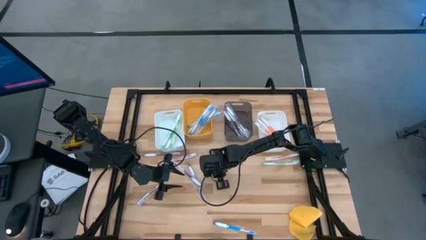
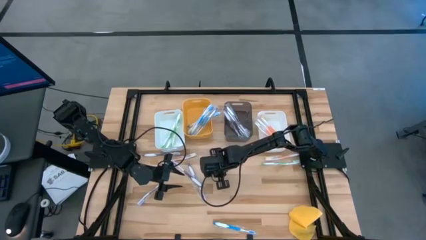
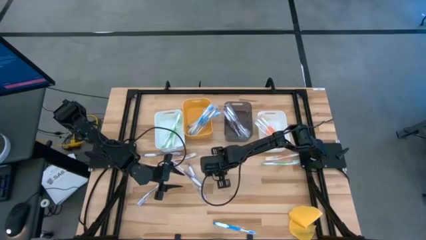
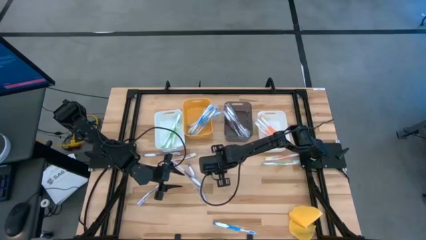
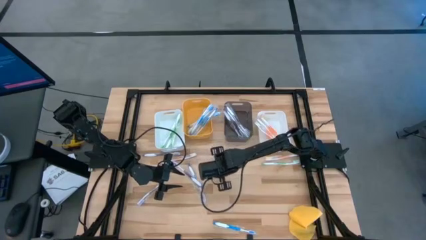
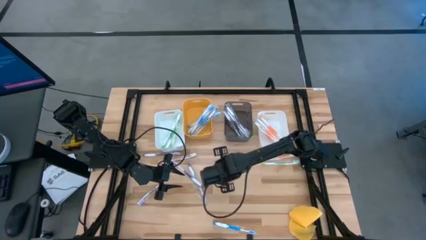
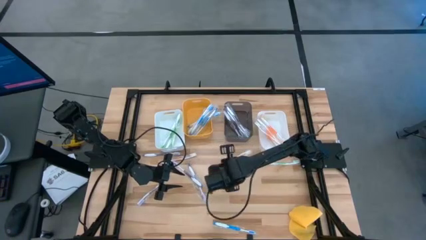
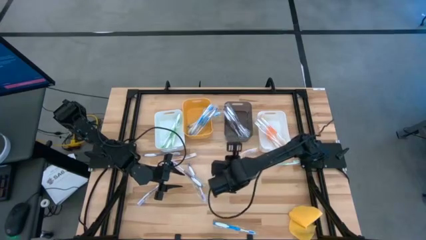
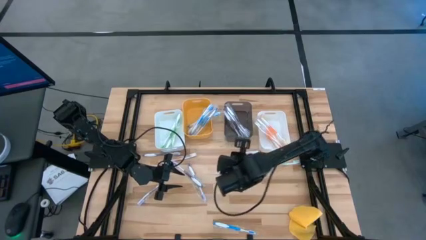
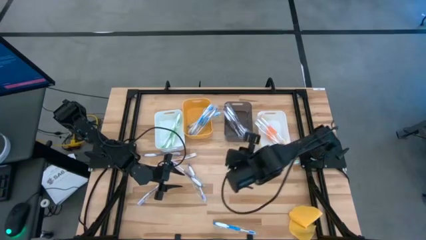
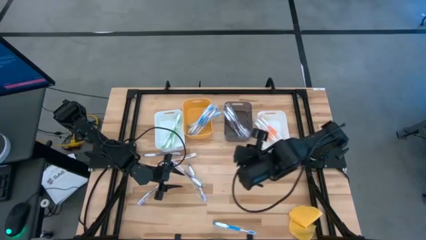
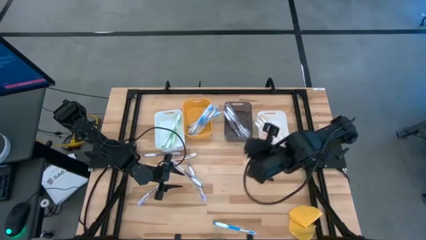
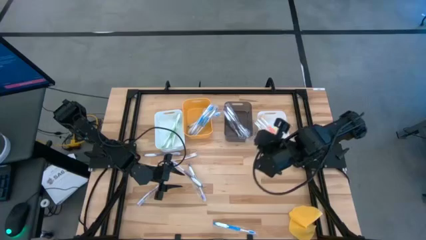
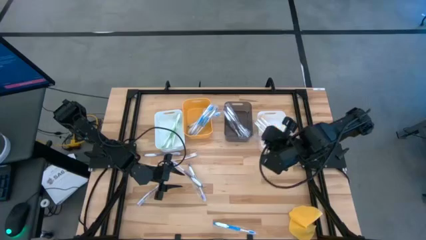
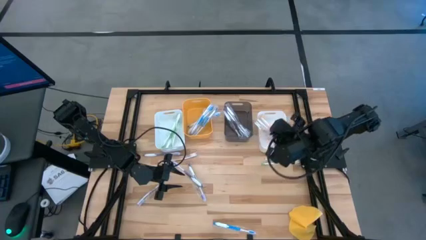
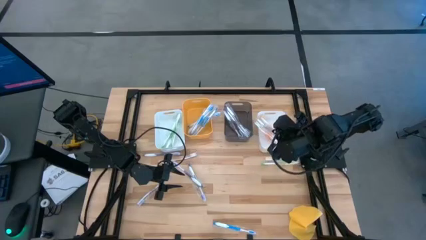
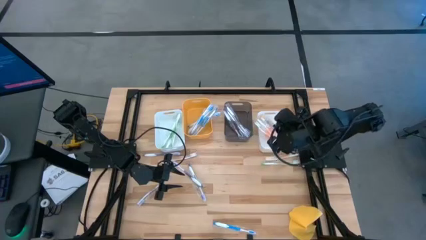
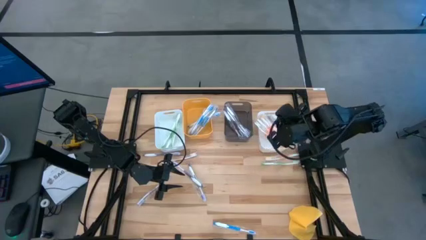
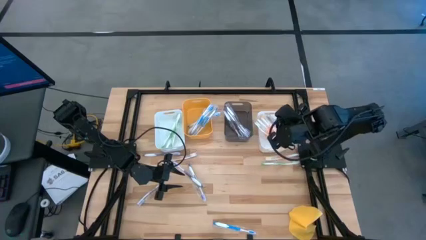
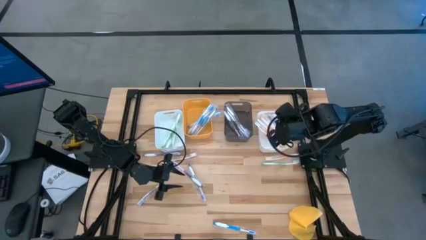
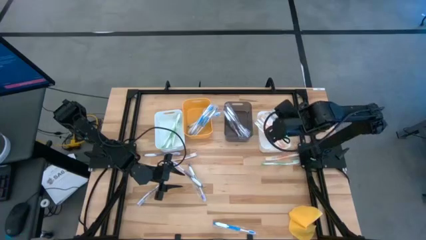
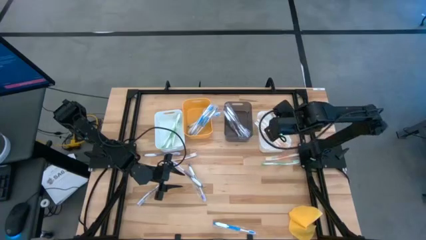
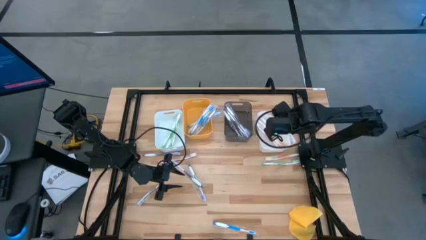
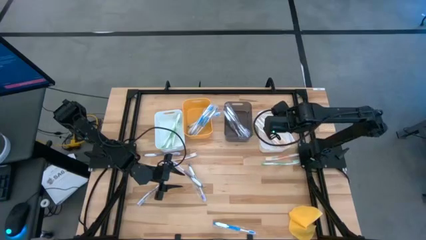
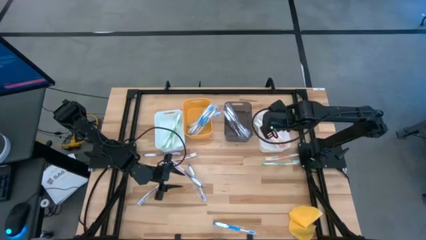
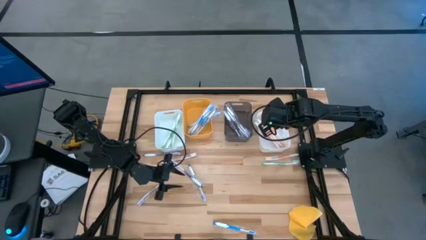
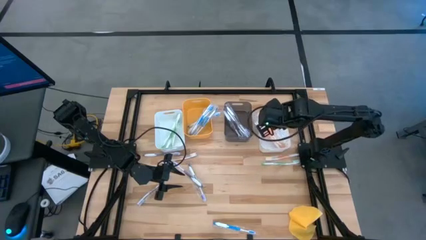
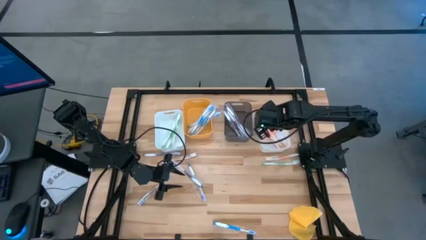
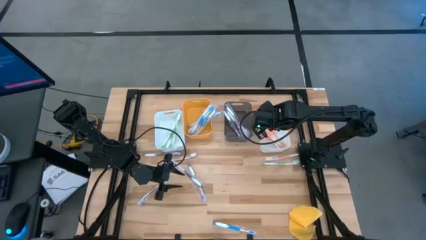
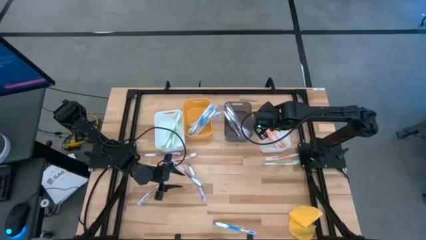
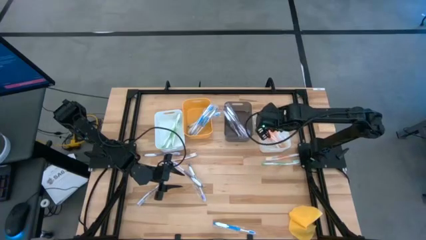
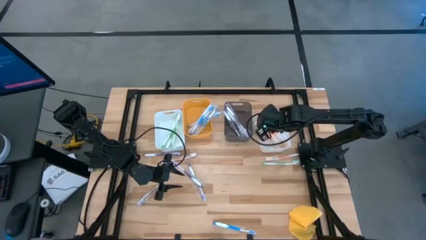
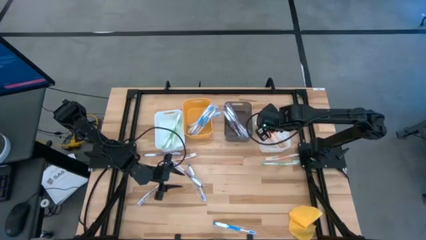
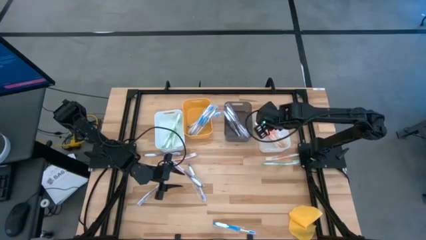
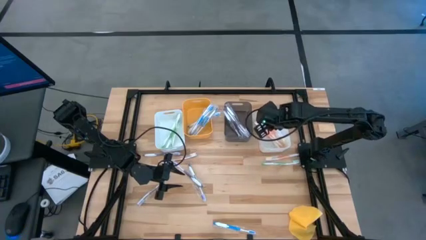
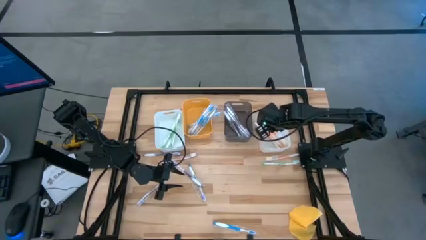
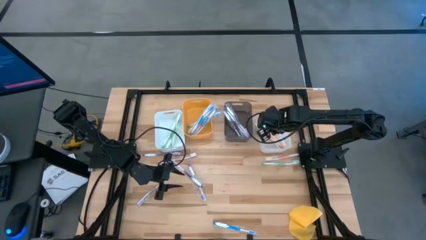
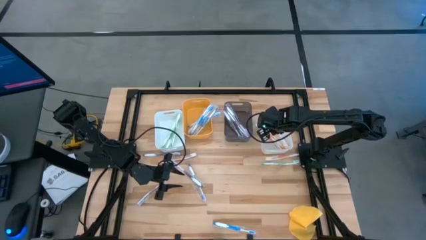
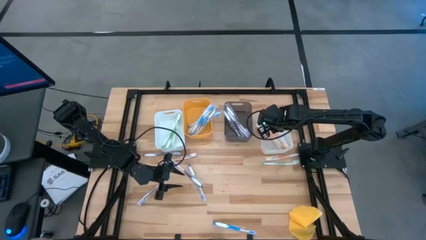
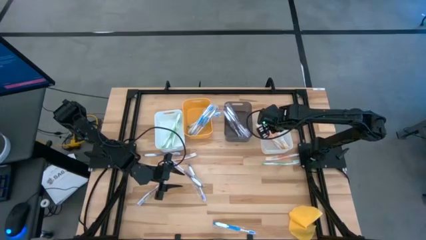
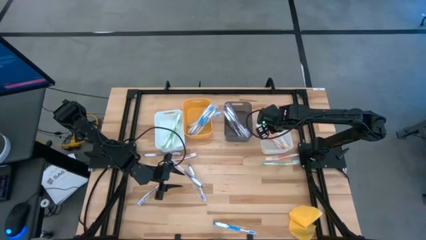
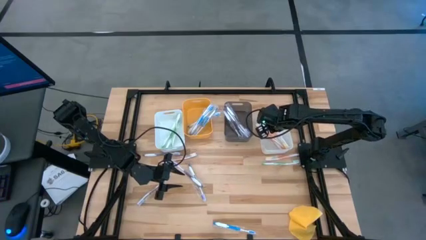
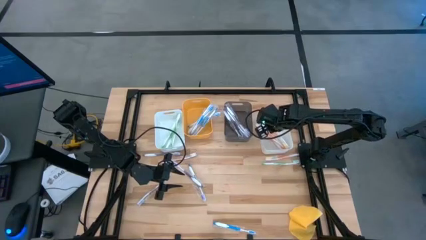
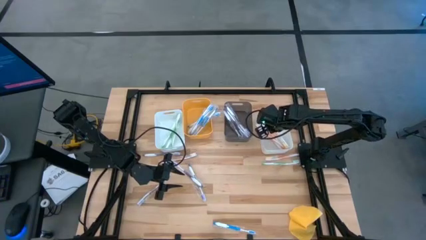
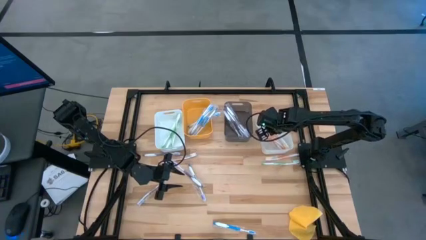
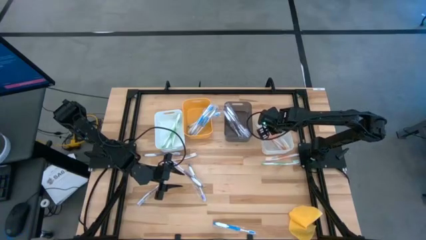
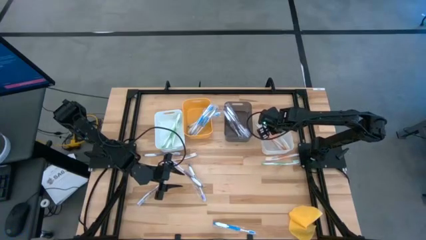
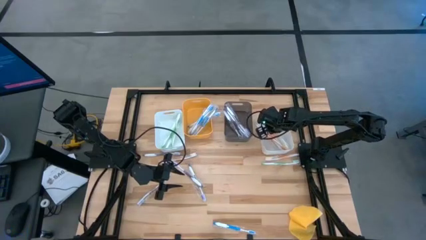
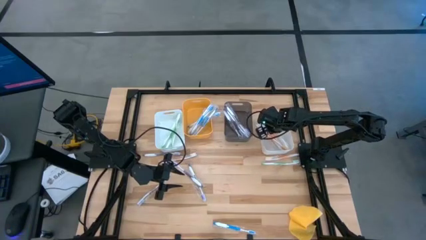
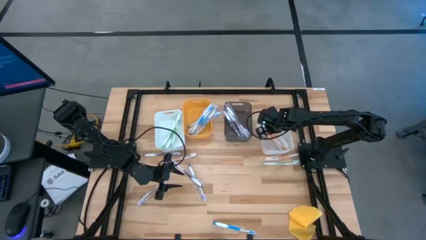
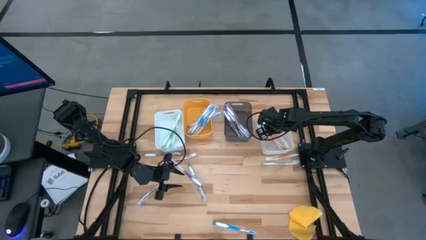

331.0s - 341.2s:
Task: Pick & Place Toothbrushes
Put the middle orange toothbrush into the right white bin

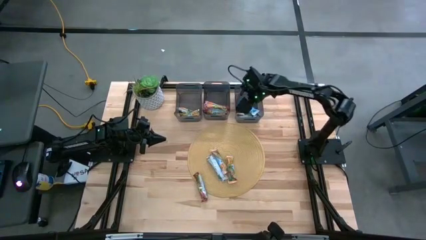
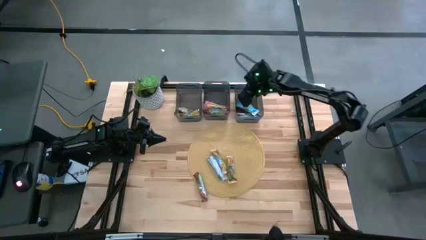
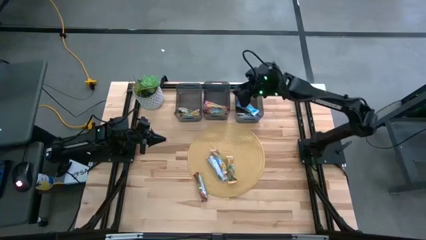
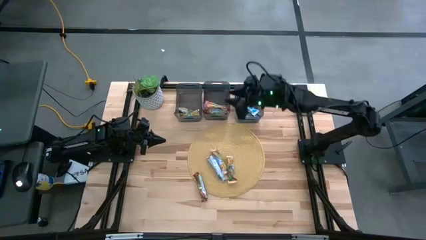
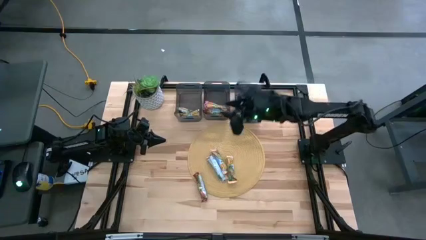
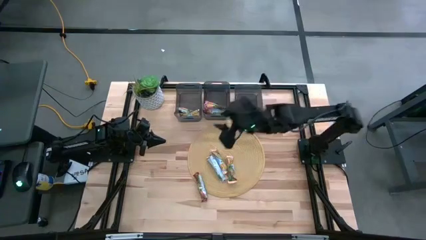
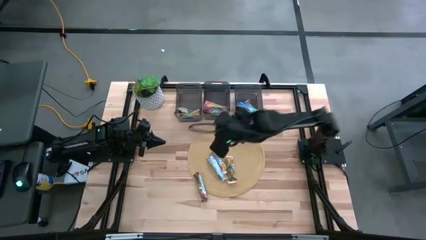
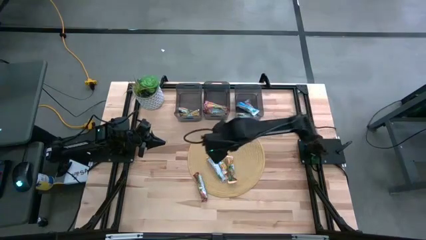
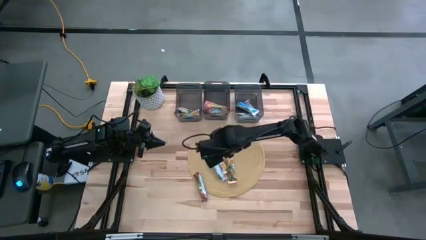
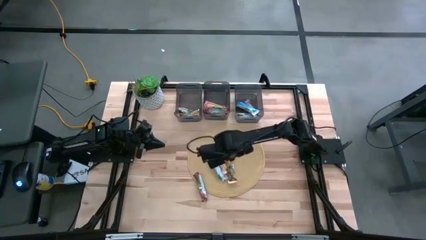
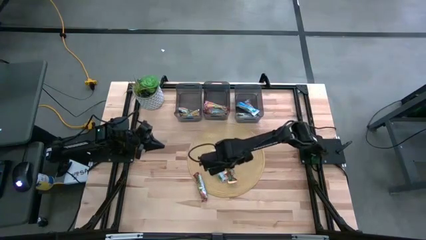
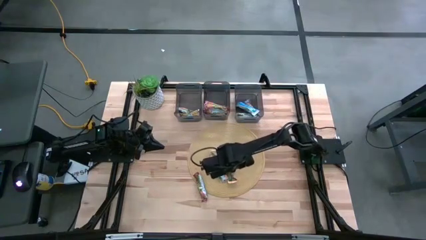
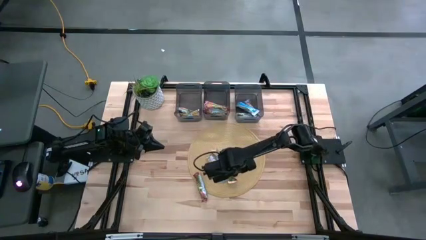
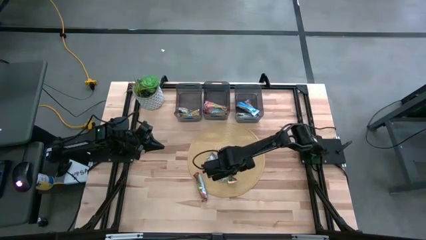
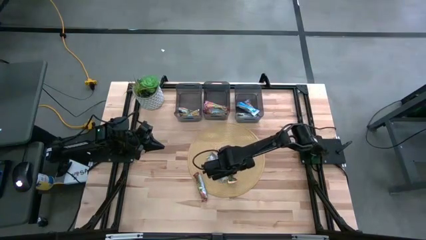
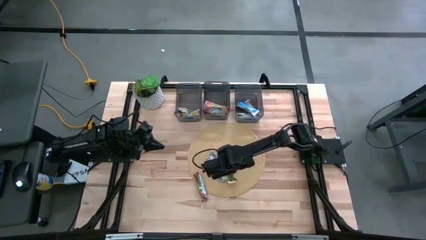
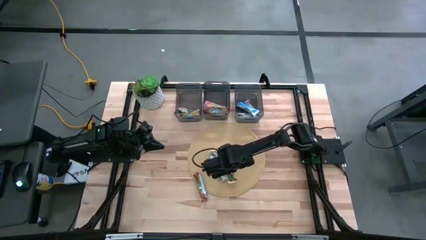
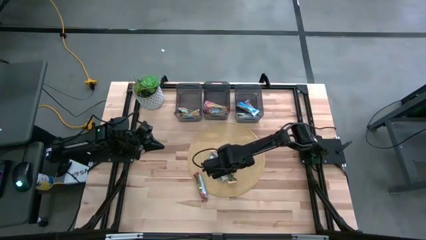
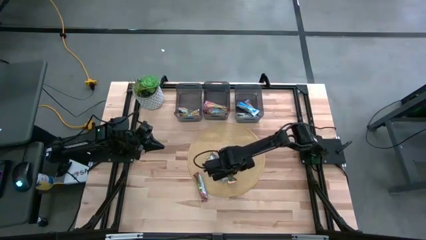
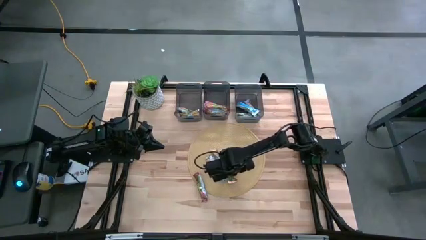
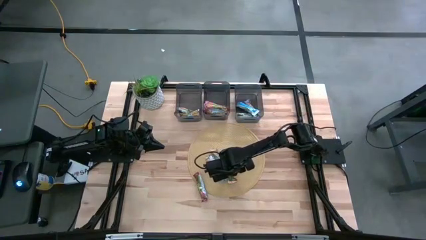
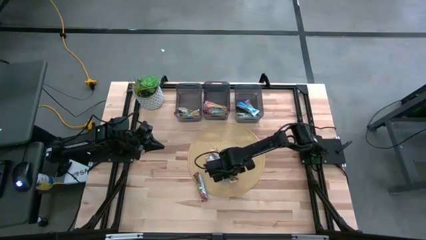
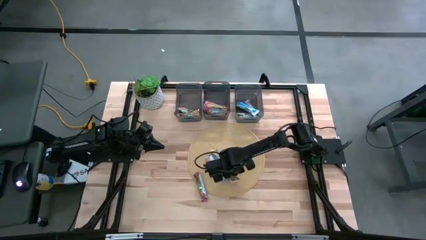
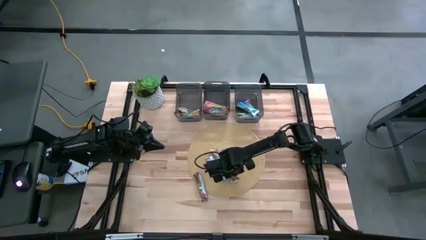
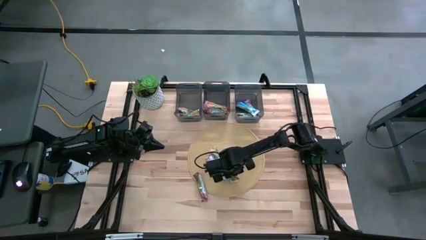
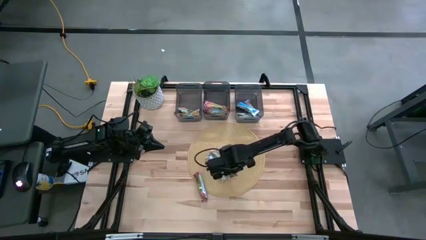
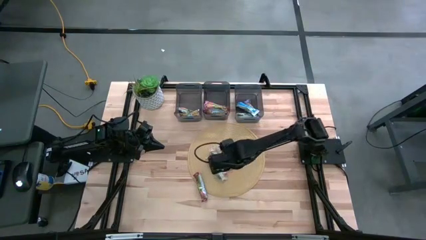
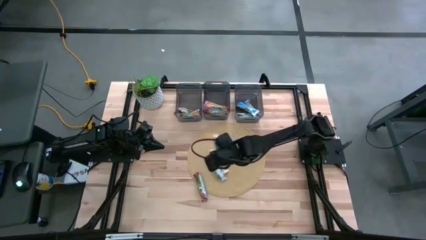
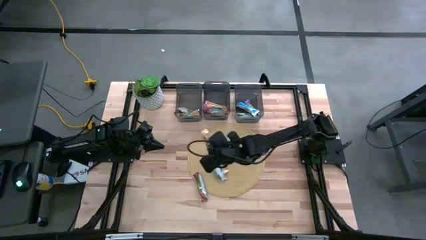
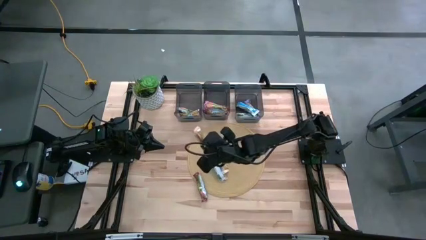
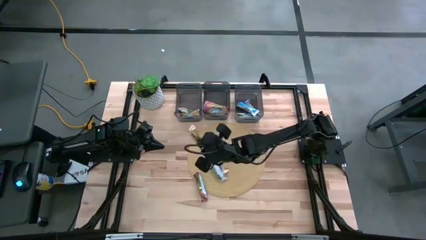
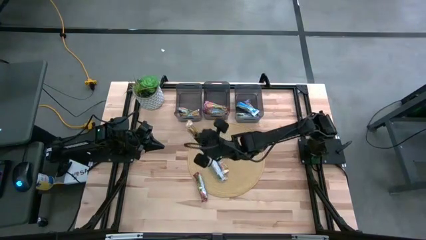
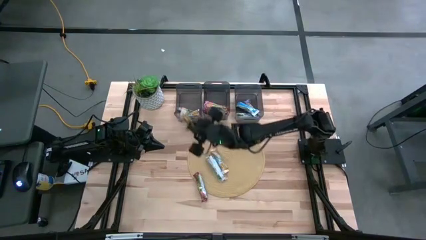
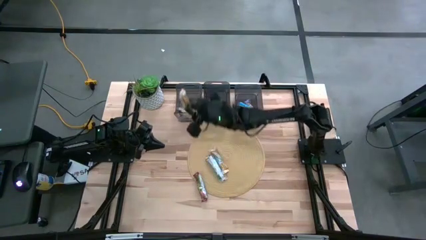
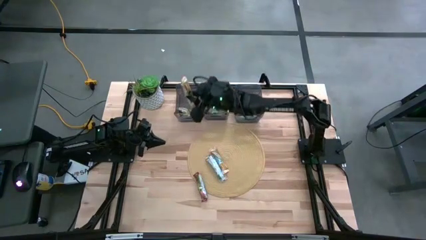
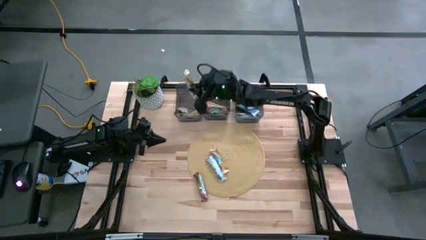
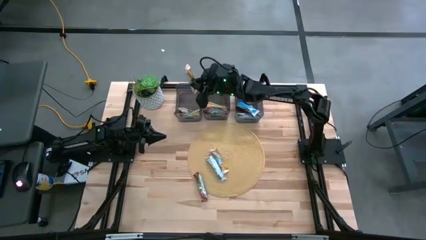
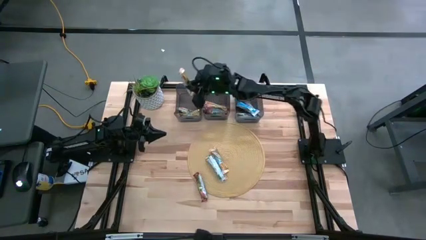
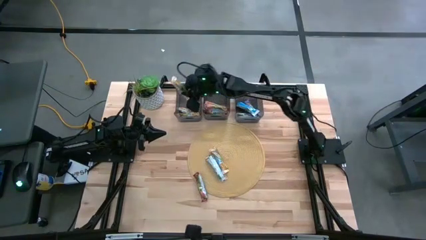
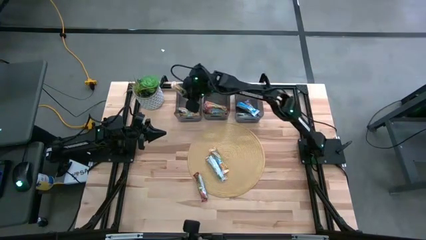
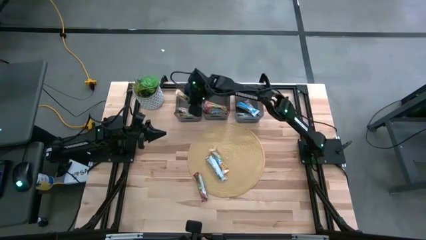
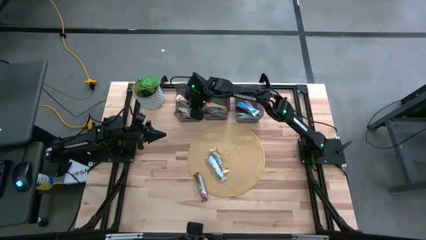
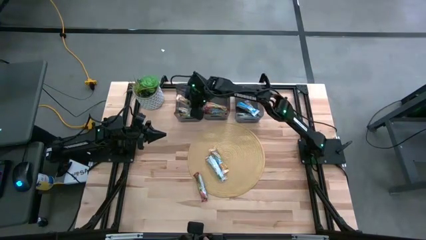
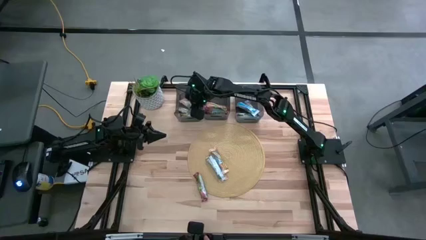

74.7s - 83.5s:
Task: Pick and place Granola Bars by type
Put the yellow granola bar into the left black bin
